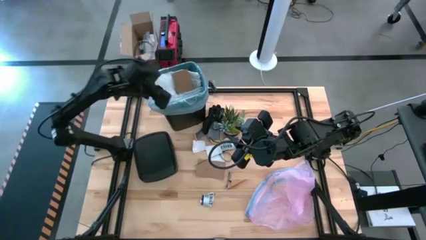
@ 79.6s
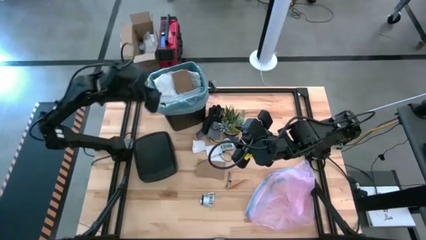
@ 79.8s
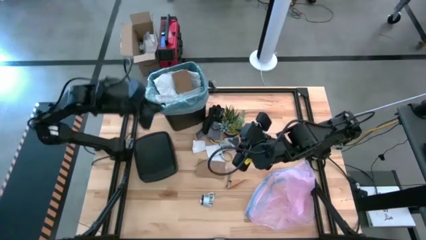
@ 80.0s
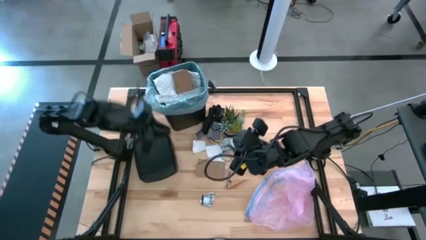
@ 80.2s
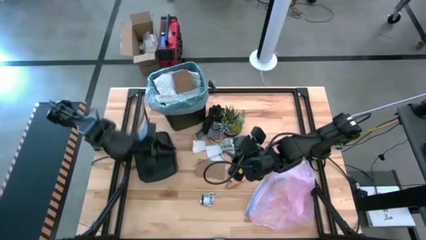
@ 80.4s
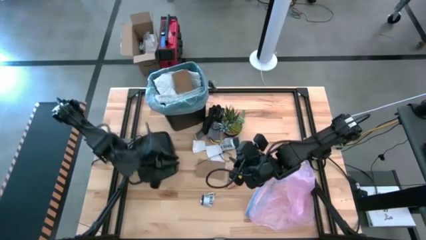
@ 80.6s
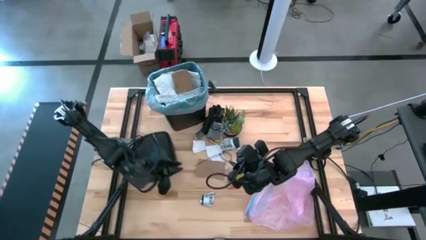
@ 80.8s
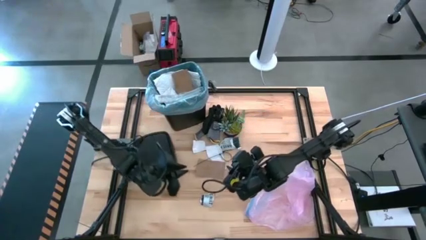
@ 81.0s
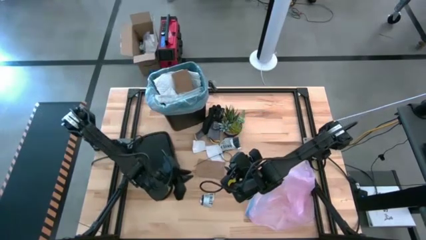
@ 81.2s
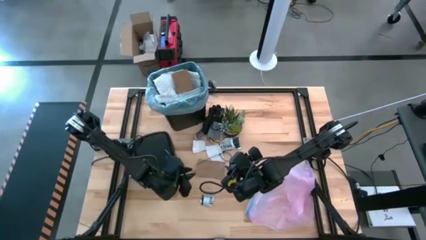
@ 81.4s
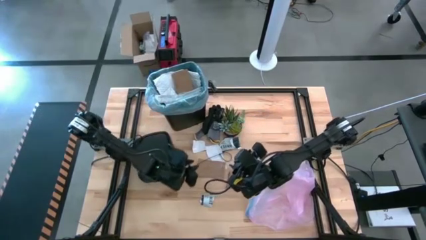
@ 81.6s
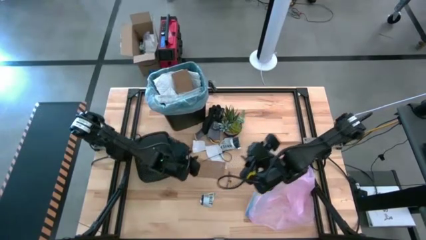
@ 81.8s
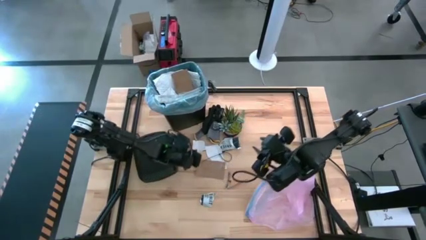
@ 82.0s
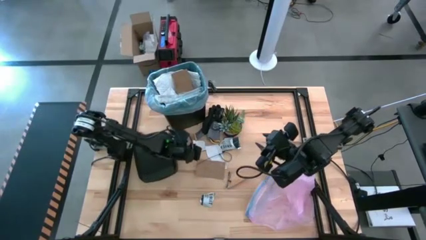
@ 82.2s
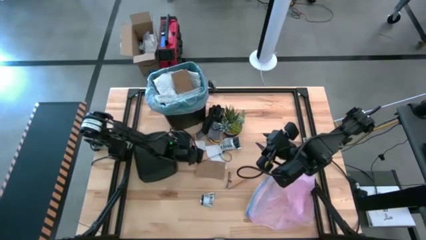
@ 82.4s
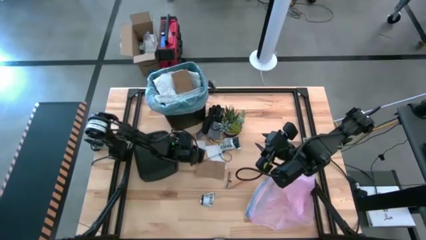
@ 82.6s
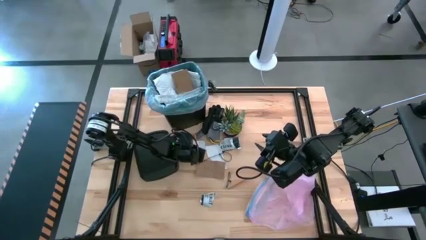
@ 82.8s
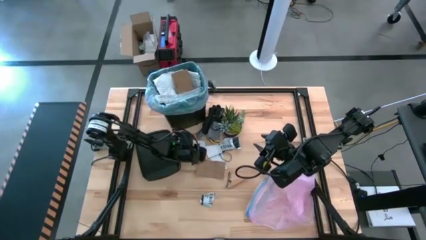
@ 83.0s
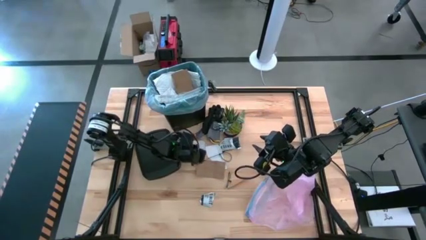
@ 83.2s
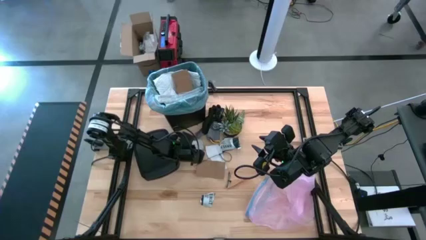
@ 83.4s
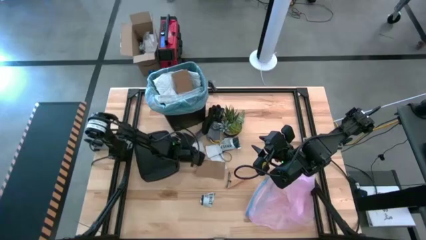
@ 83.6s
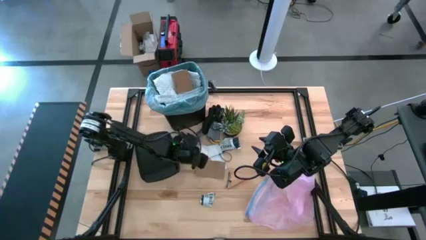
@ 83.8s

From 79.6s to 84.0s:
Task: place trash/remove bag and relplace
Put the white paper into the trash bin

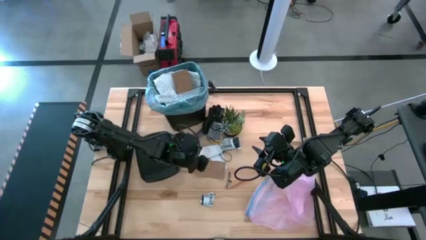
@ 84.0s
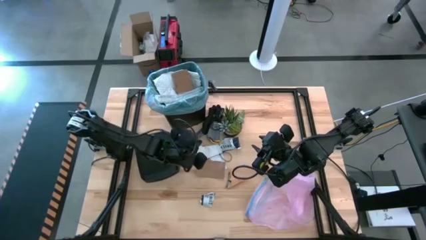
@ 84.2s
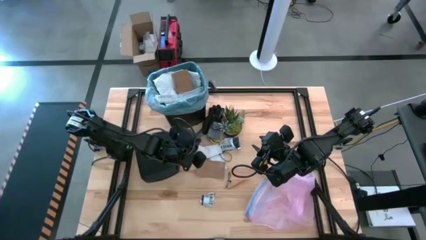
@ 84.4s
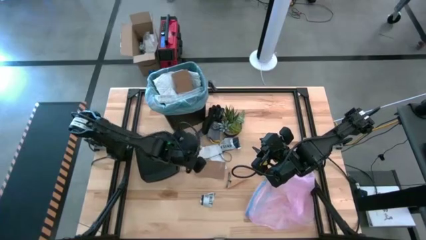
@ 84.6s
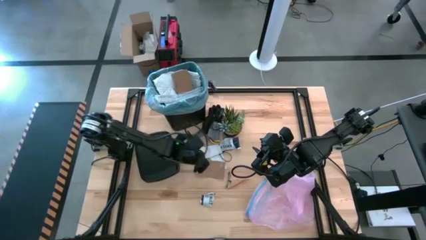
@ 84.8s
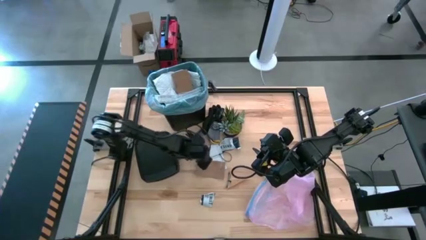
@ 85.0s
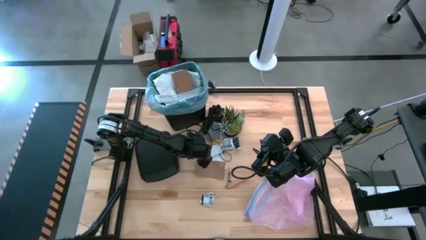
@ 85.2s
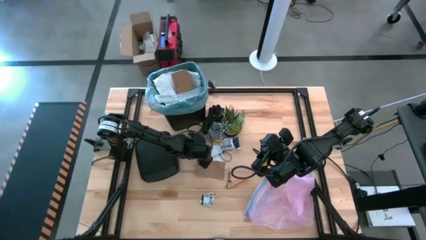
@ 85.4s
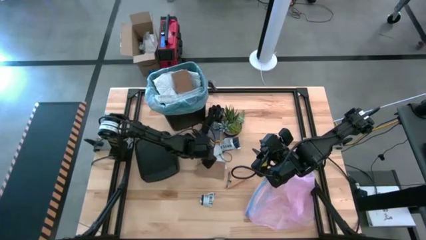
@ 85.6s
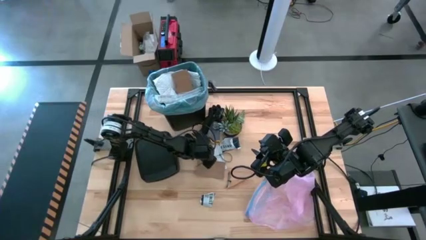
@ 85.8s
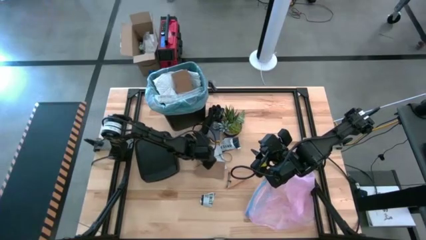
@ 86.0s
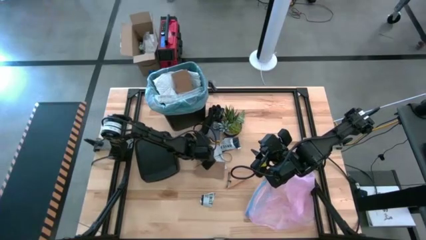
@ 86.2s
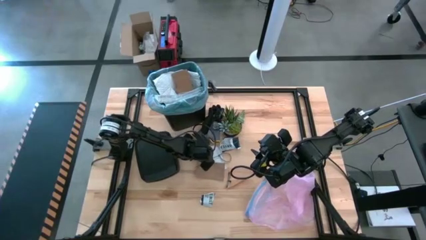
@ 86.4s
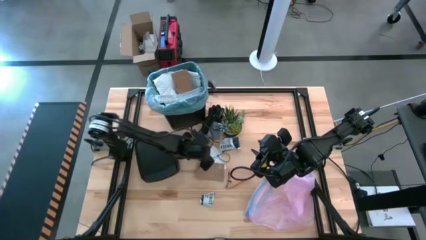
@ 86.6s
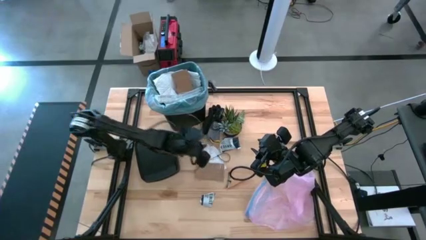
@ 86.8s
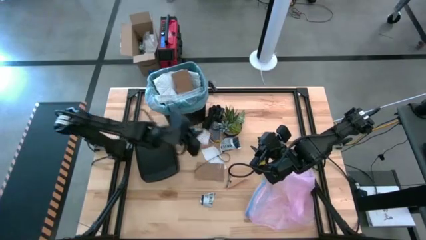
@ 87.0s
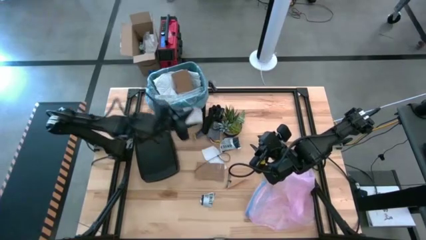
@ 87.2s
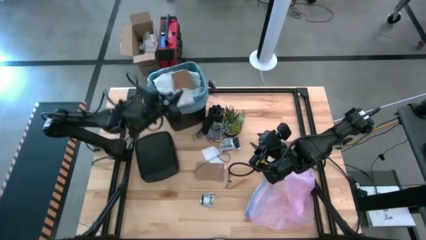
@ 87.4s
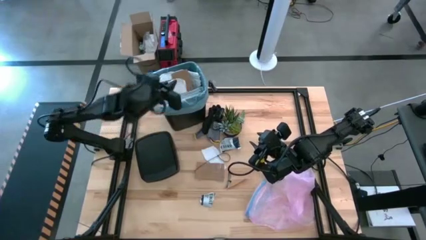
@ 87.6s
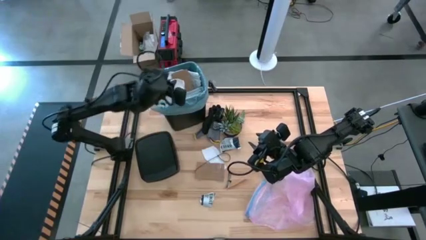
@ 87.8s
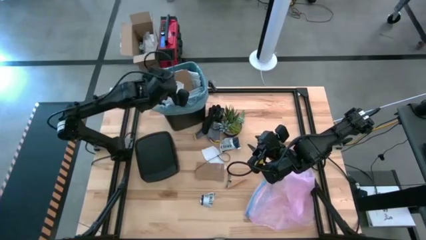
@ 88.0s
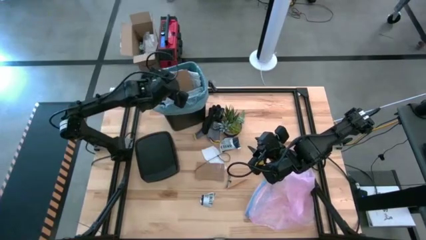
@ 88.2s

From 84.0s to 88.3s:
Put the white paper into the trash bin

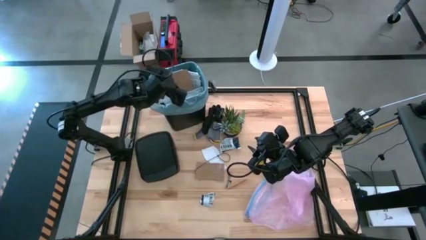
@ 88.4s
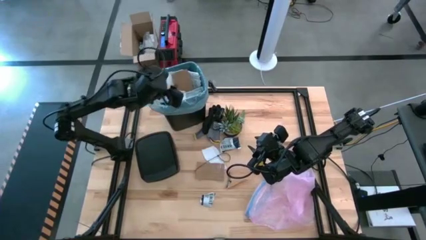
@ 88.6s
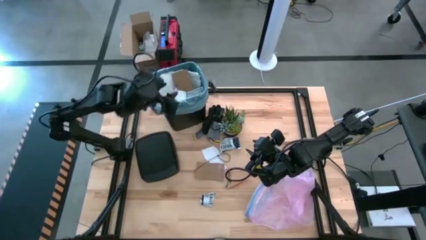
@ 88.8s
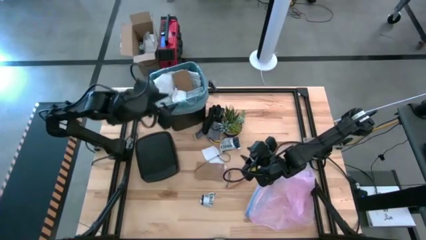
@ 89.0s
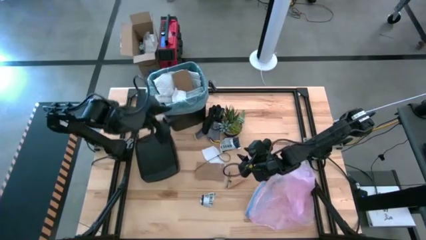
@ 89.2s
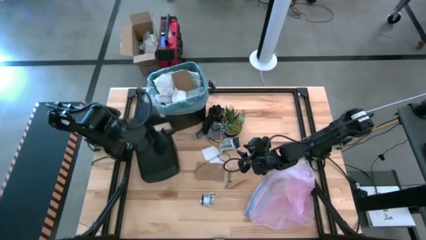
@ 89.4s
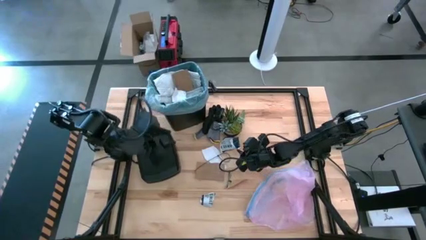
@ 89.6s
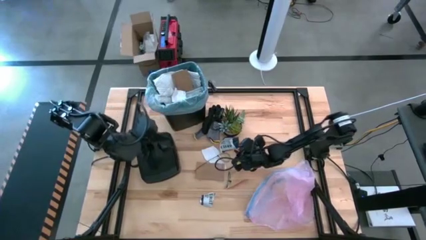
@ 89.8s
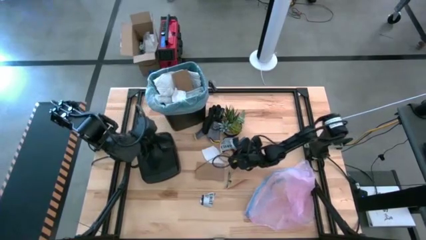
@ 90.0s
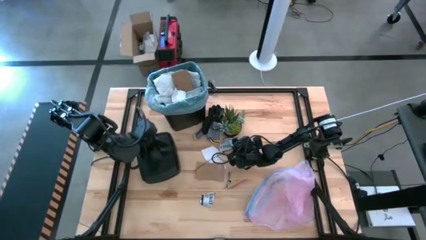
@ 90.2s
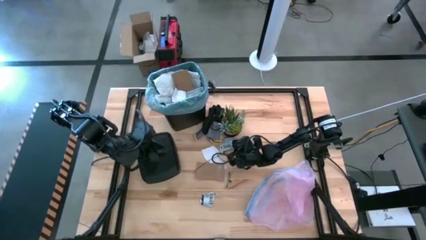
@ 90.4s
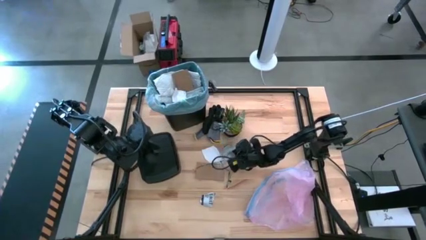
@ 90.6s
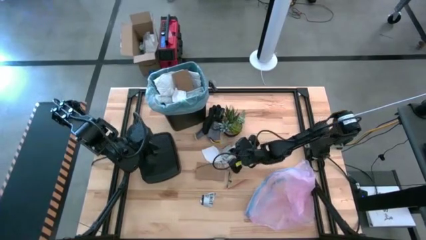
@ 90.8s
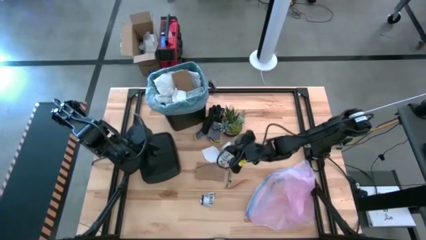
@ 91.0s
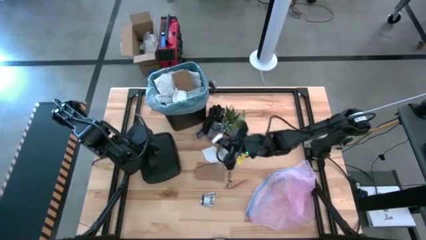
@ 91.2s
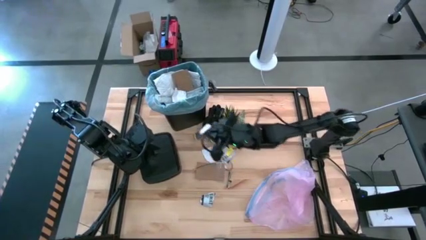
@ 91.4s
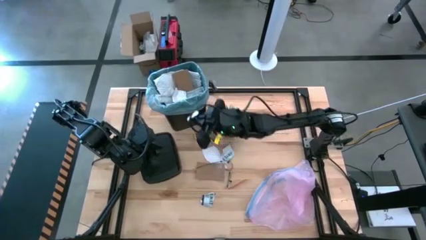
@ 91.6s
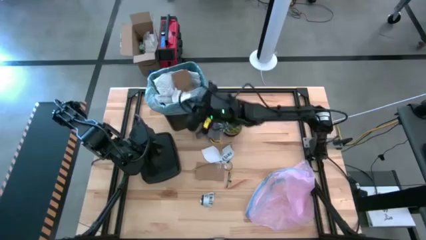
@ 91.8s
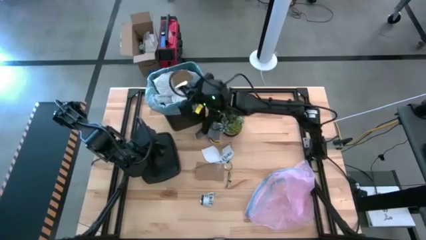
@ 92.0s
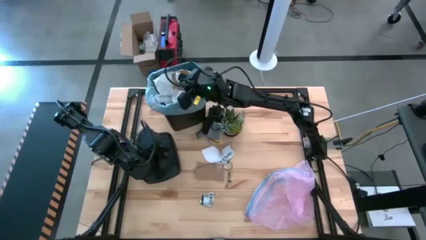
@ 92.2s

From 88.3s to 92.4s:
Put the black paper into the trash bin

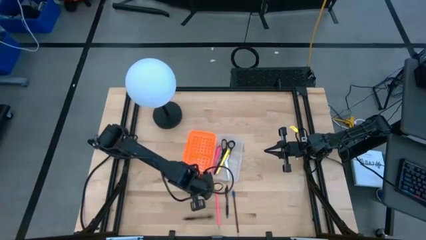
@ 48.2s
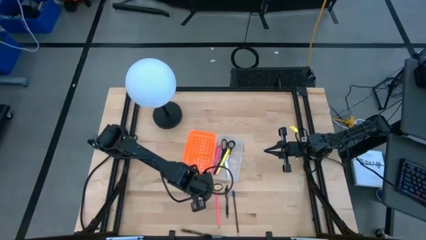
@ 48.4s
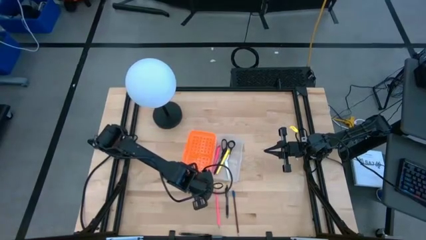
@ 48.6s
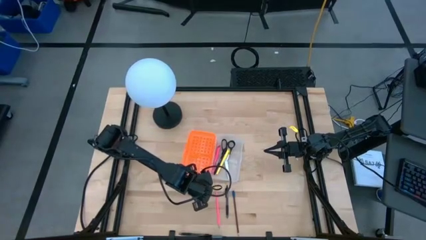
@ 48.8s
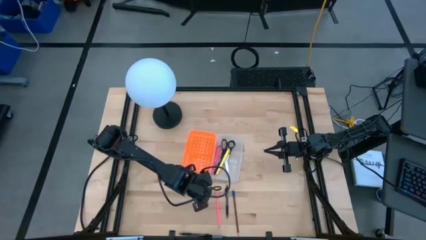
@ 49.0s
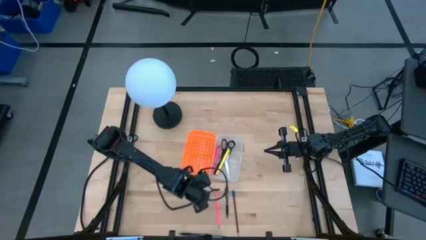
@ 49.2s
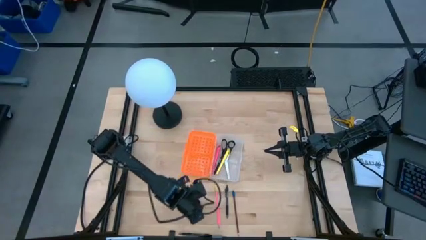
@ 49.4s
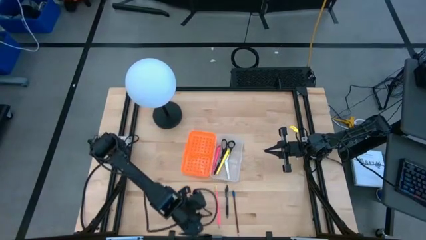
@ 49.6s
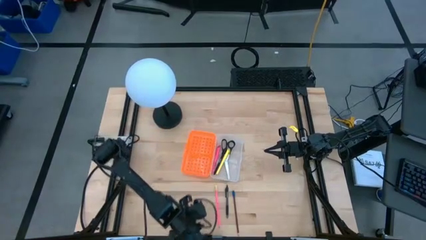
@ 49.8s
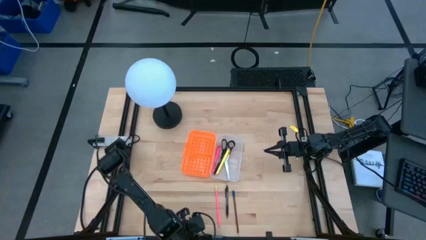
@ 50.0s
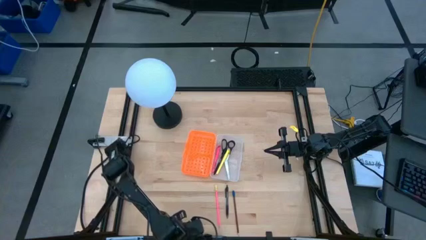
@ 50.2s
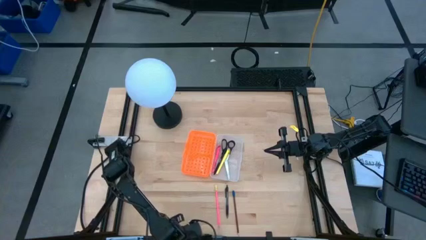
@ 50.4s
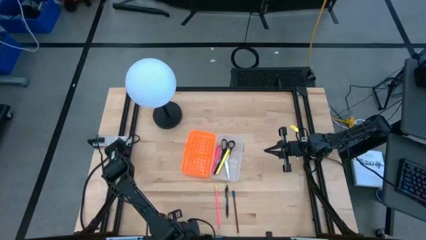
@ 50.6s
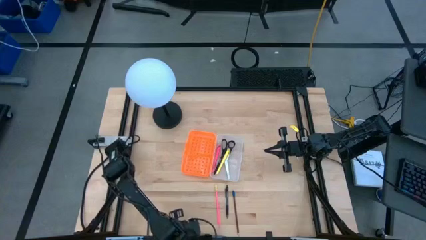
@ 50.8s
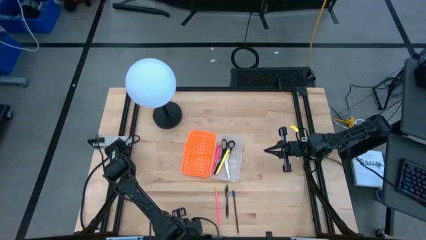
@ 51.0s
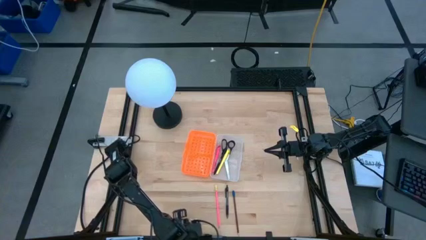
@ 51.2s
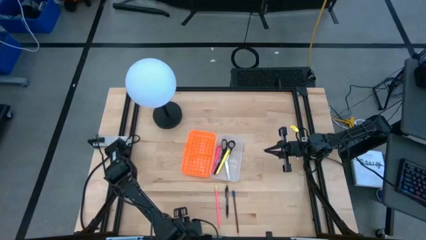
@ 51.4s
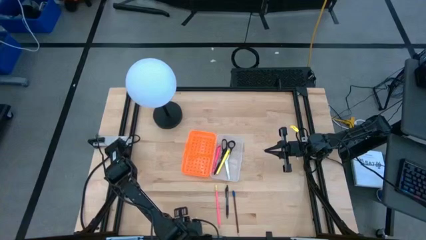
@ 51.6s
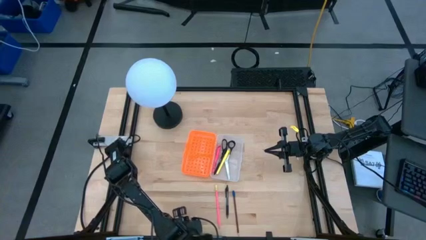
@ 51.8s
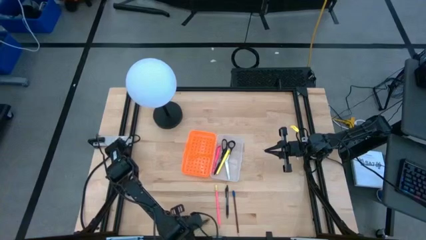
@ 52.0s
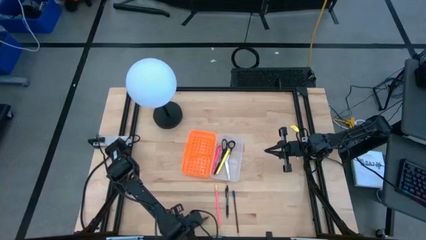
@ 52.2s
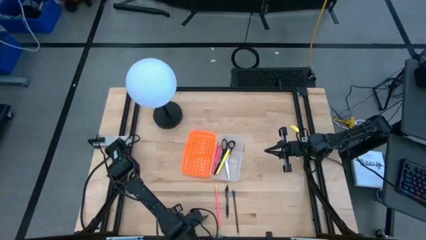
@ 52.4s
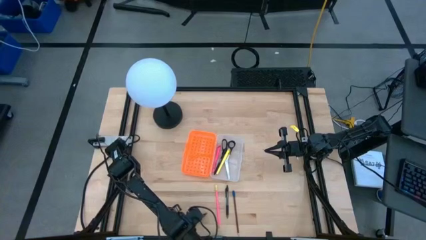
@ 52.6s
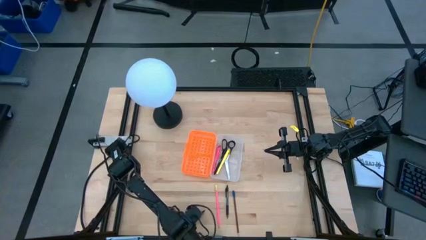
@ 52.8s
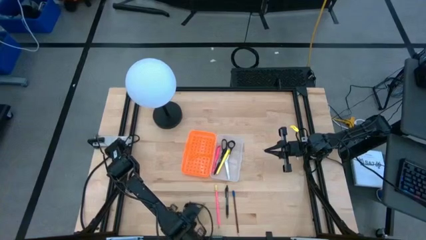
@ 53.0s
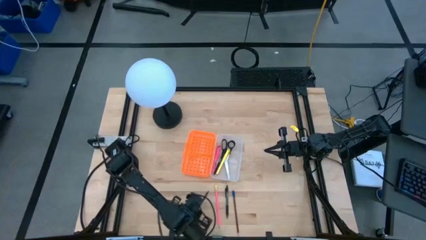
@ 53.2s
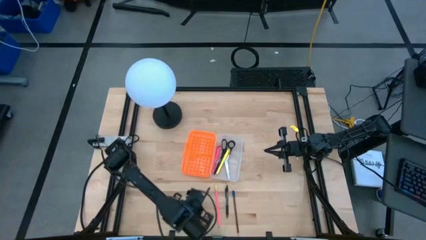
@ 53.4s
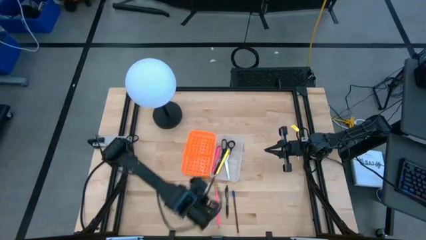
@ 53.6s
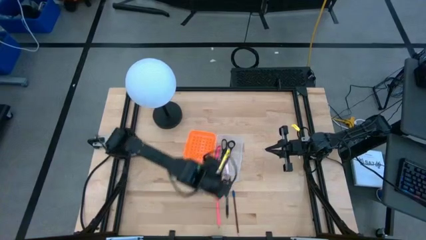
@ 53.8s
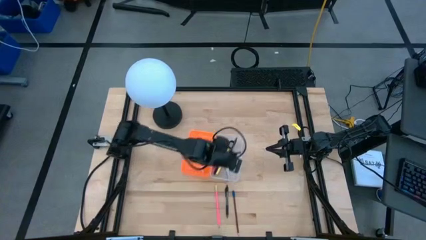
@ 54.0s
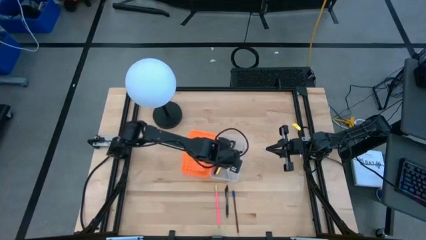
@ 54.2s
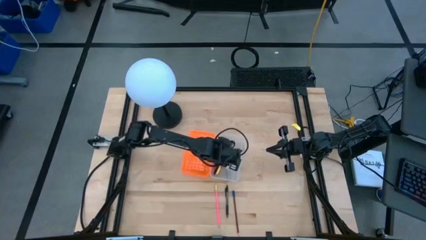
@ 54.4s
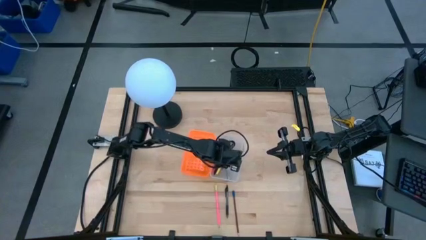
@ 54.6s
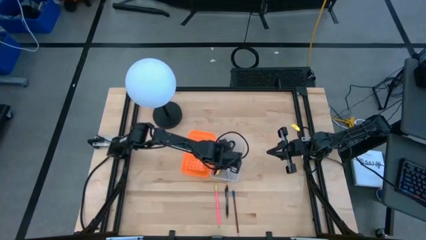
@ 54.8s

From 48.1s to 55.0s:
Task: Pick & place school supplies into a supply box
Put the top transparent pen into the orange supply box
